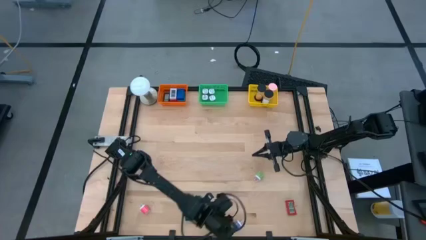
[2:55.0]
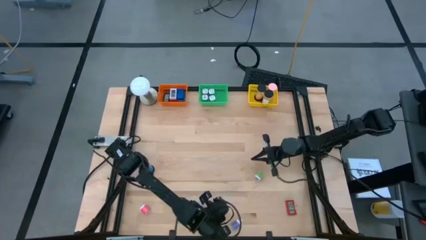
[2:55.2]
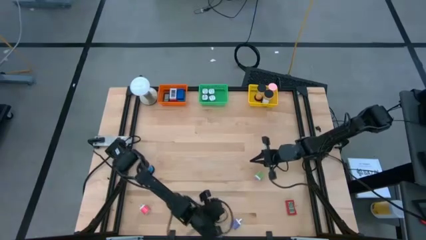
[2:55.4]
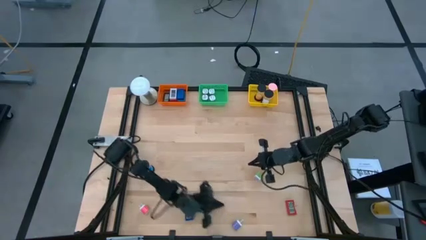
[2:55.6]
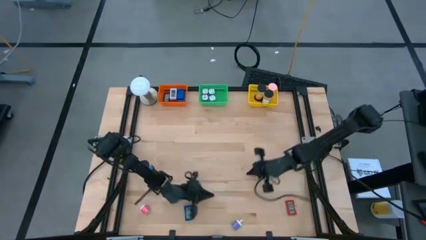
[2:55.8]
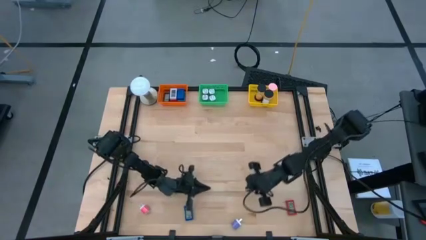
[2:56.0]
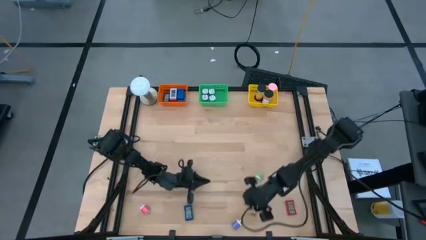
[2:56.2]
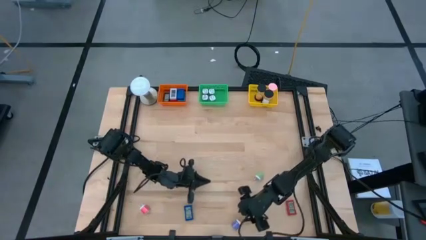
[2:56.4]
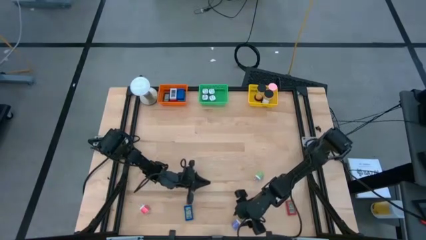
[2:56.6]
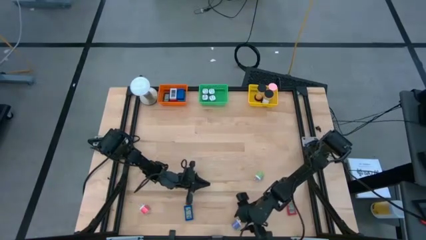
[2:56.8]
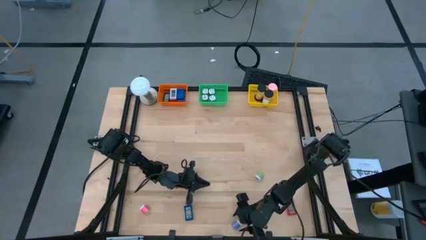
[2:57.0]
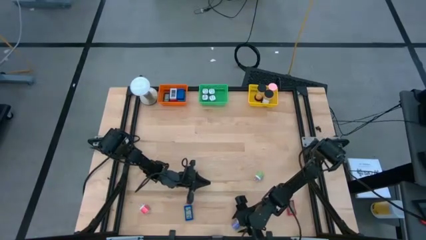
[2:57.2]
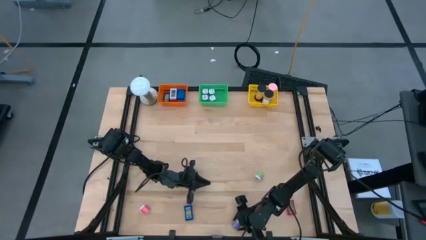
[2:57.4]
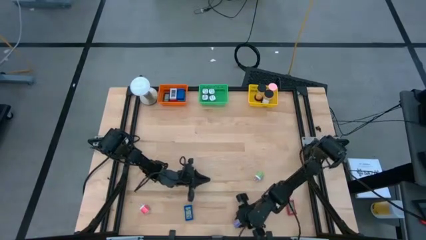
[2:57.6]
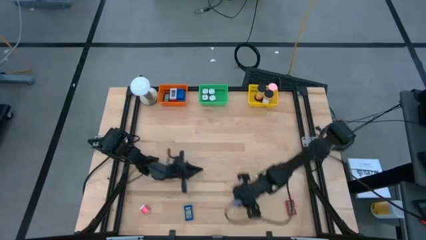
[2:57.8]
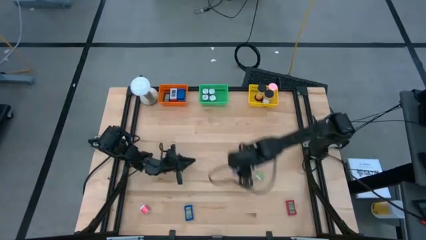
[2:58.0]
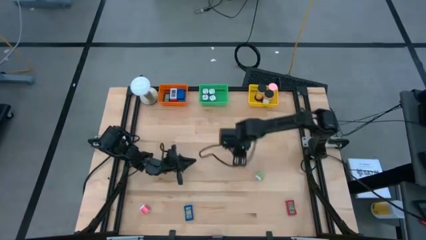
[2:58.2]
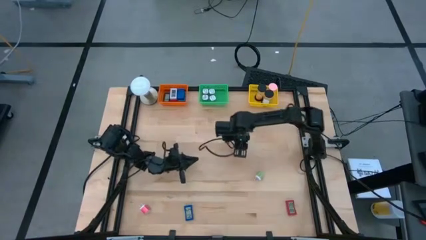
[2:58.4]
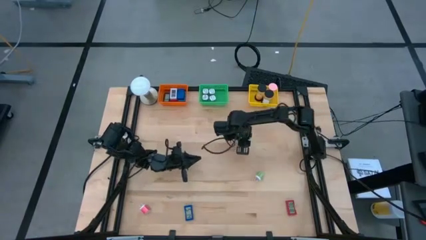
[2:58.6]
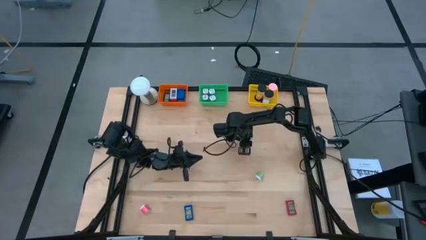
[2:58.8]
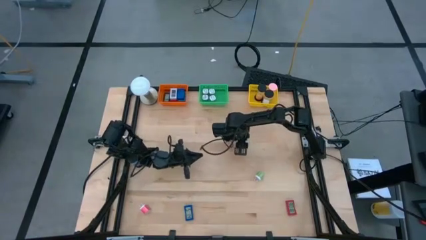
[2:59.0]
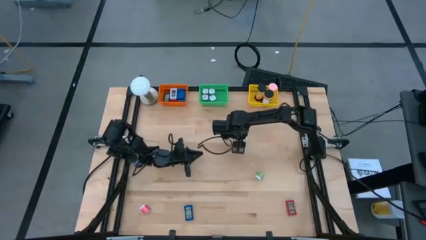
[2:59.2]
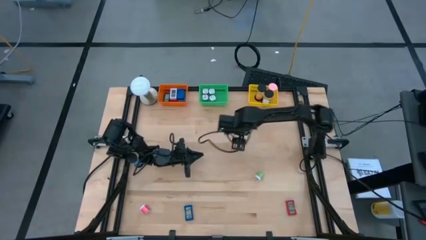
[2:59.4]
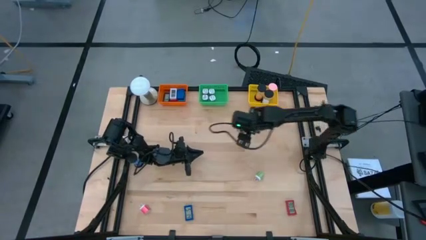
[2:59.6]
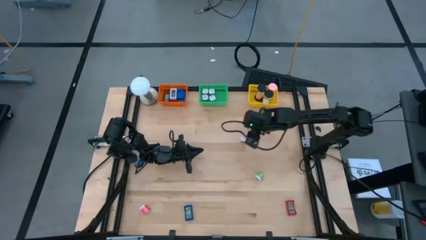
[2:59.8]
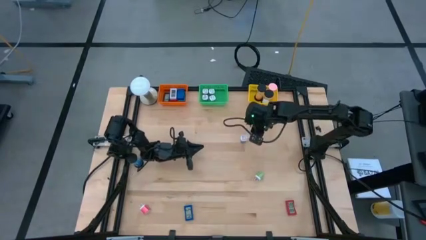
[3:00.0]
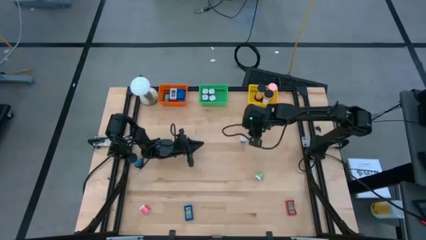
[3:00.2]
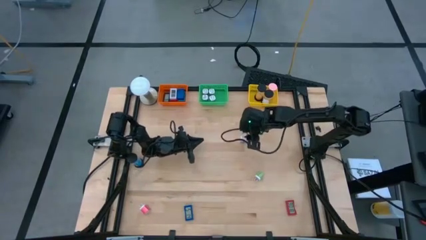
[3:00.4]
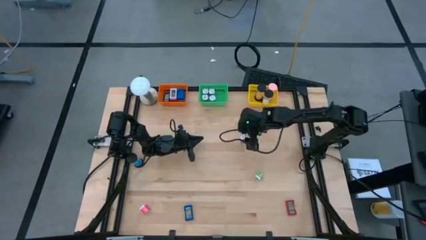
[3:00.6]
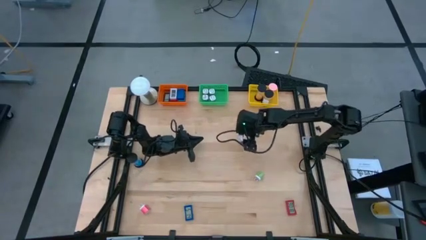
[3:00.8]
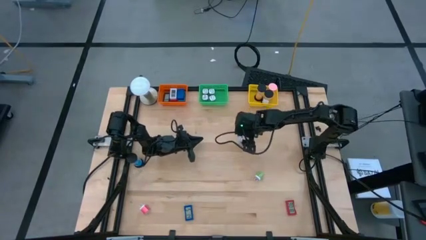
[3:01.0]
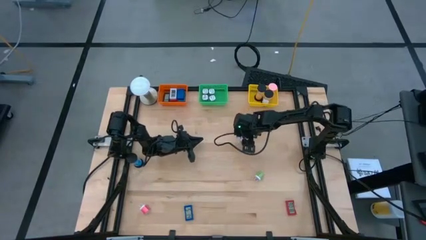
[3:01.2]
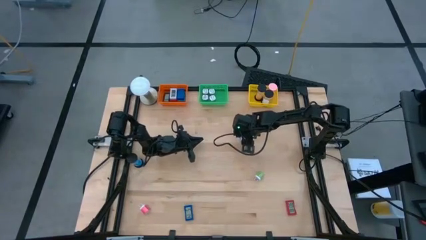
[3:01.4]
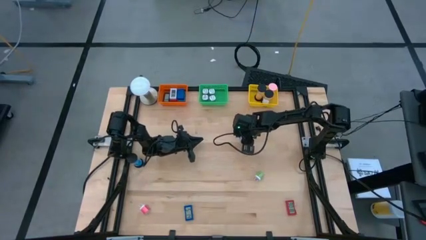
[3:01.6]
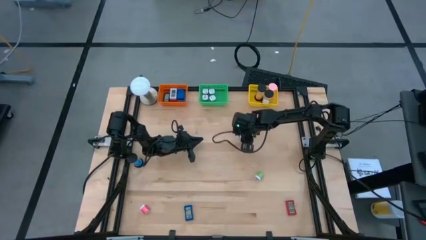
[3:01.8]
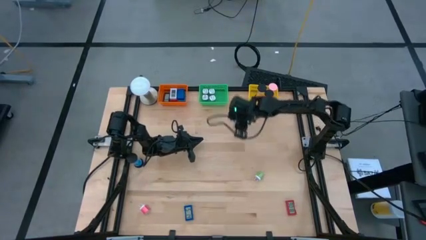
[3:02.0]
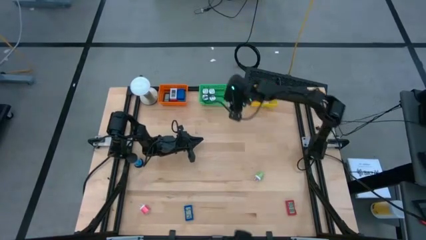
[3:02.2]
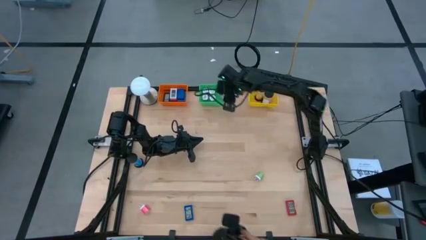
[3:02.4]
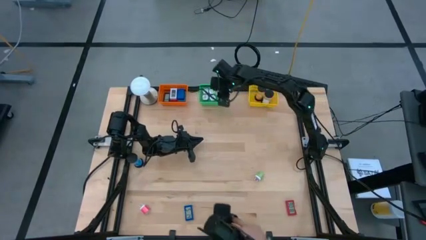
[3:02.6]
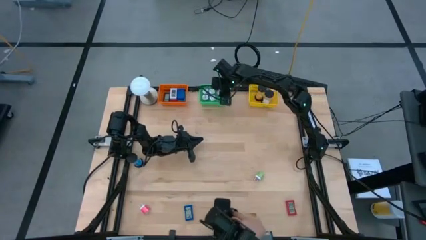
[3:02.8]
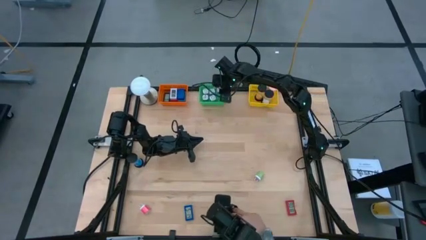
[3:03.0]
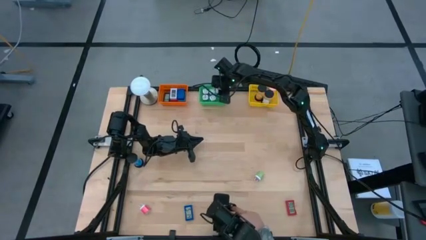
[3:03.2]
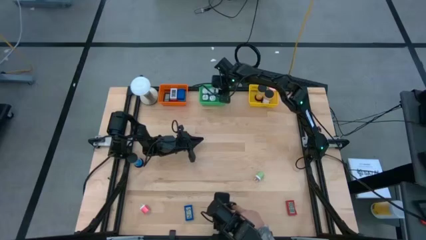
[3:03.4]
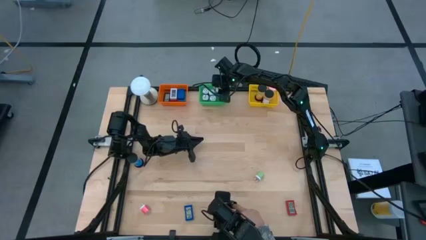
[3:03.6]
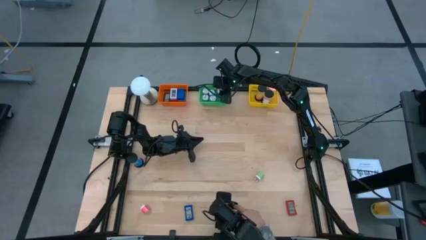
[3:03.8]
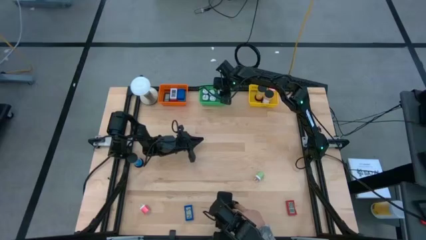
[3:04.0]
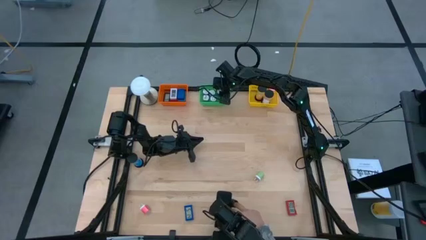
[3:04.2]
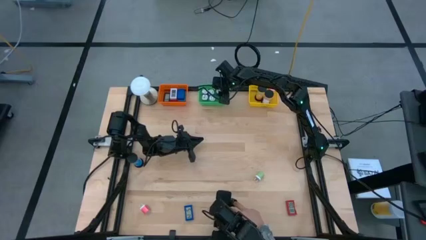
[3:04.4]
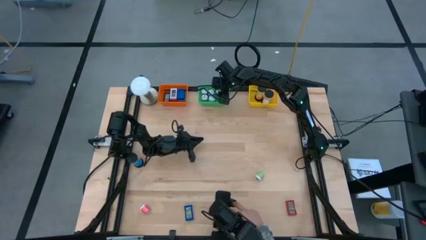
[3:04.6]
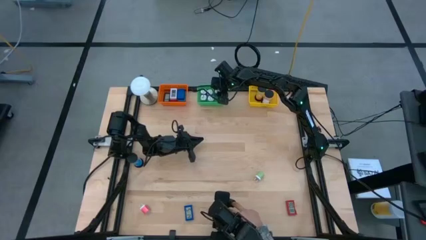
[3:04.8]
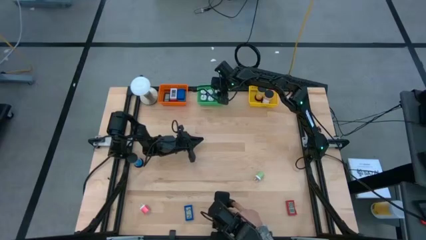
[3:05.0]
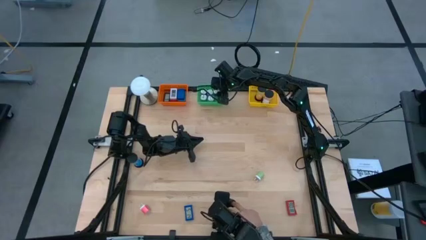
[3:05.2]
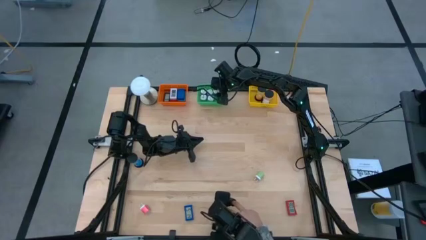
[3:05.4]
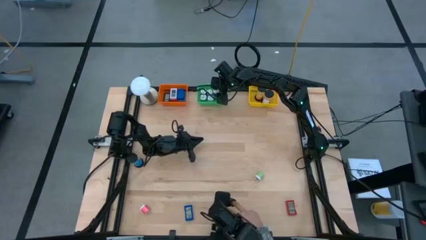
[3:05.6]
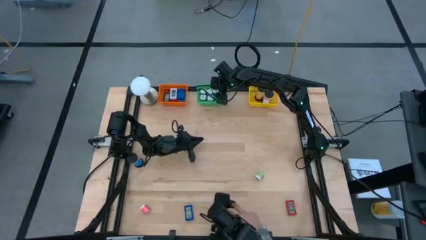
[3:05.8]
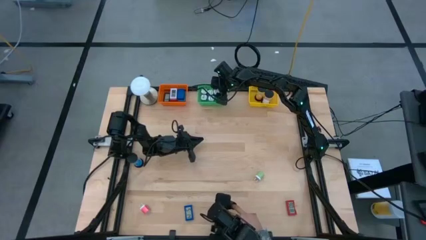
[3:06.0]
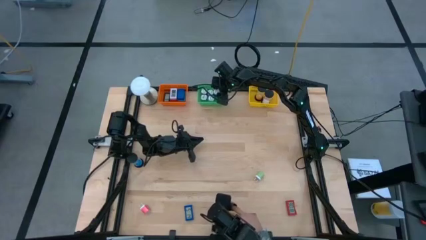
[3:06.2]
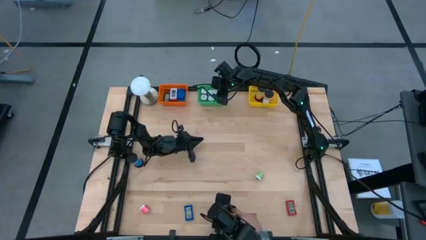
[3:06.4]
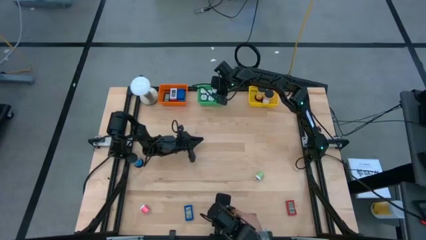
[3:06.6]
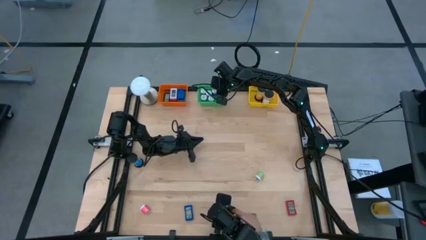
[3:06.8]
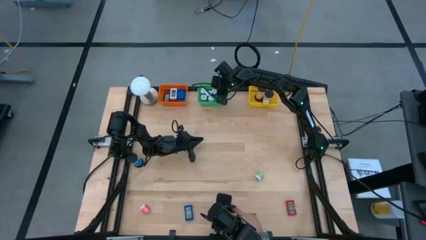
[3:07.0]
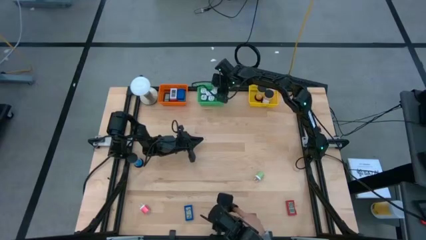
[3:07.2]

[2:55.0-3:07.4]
Task: Pick & Place Office items
Put the blue charger adapter into the green basket
